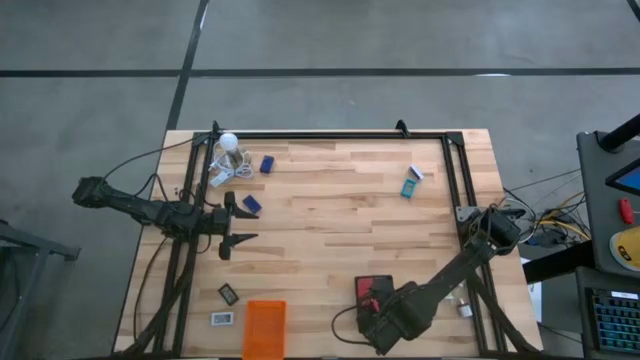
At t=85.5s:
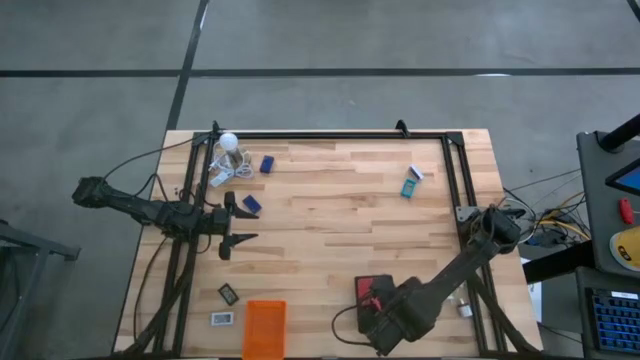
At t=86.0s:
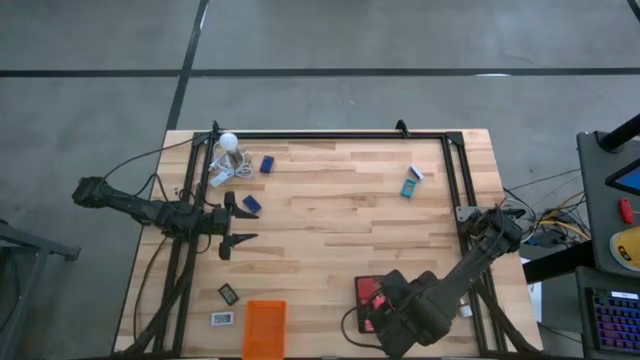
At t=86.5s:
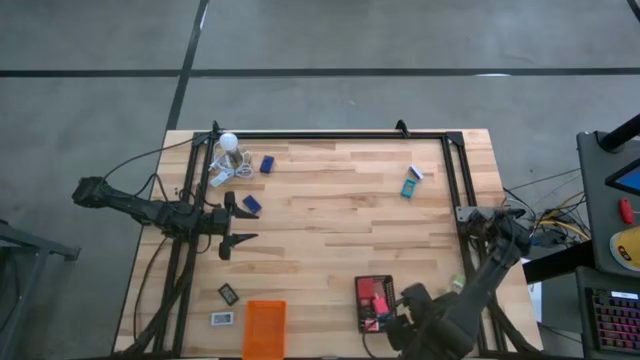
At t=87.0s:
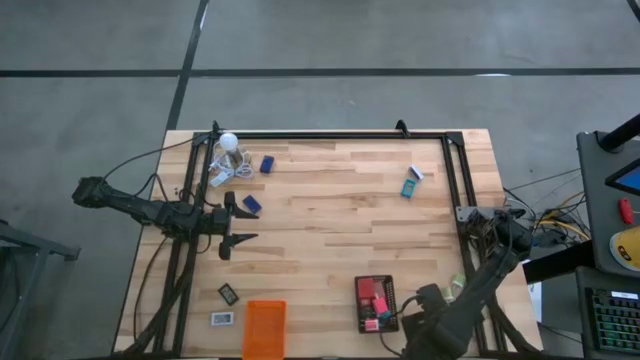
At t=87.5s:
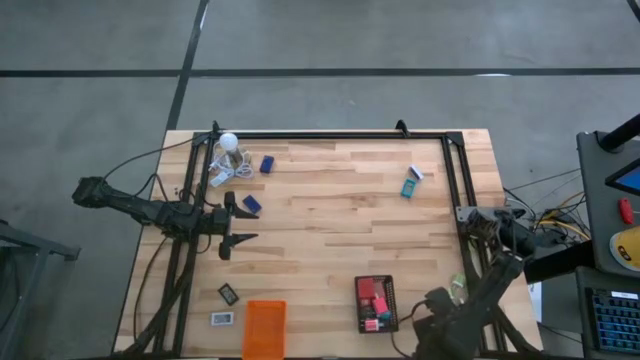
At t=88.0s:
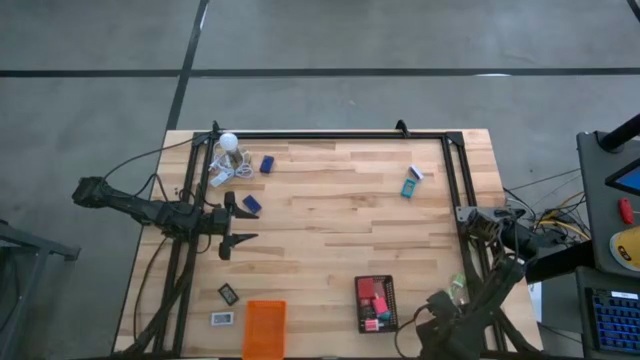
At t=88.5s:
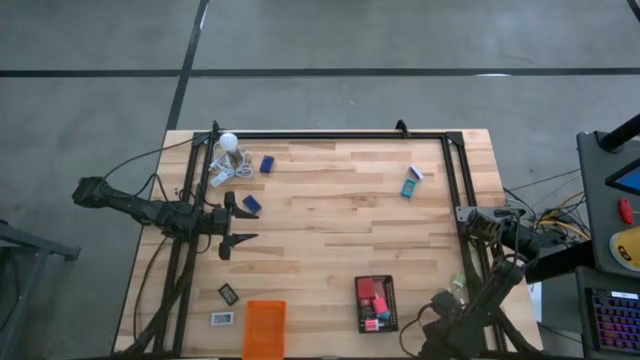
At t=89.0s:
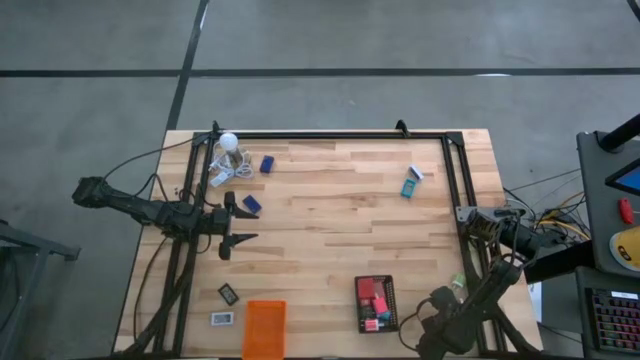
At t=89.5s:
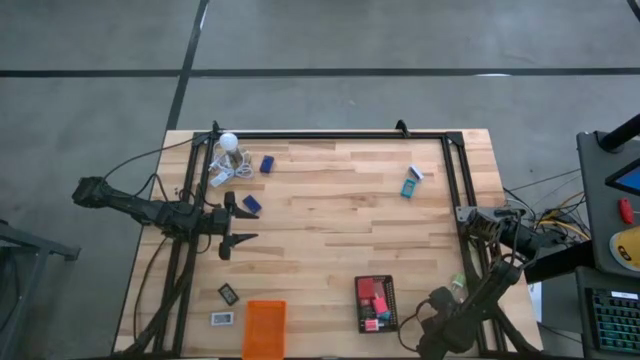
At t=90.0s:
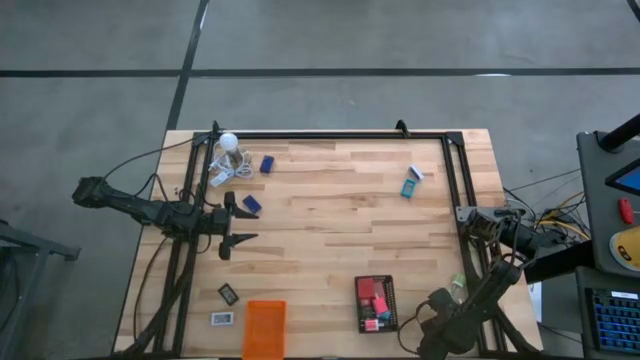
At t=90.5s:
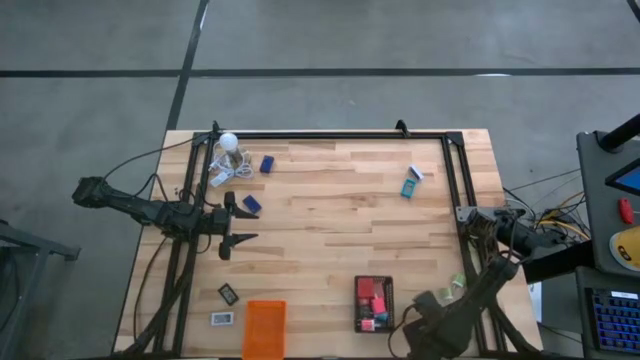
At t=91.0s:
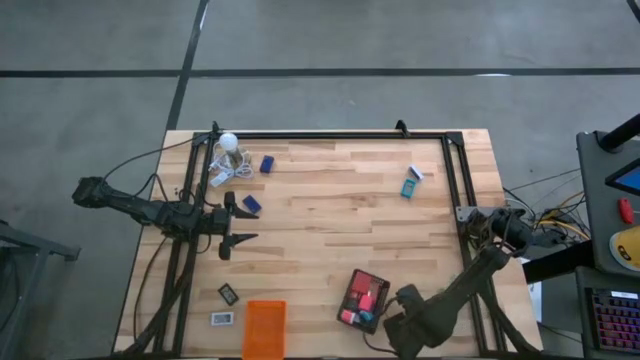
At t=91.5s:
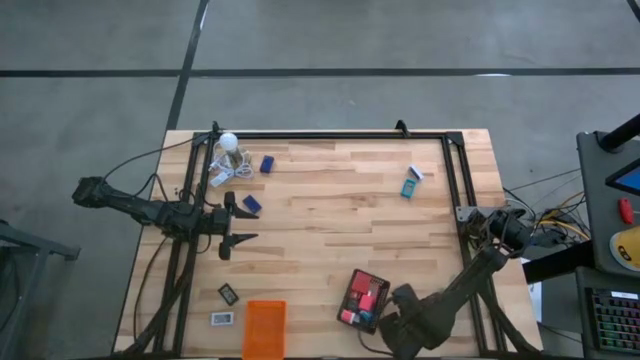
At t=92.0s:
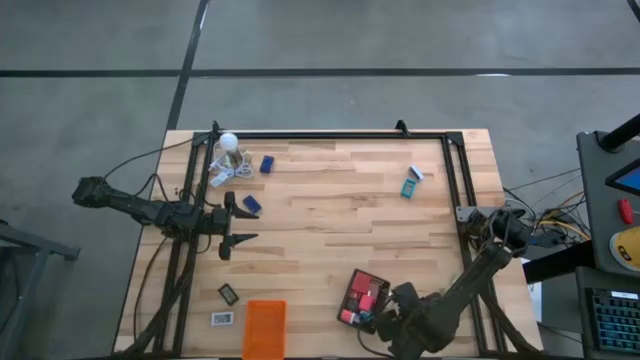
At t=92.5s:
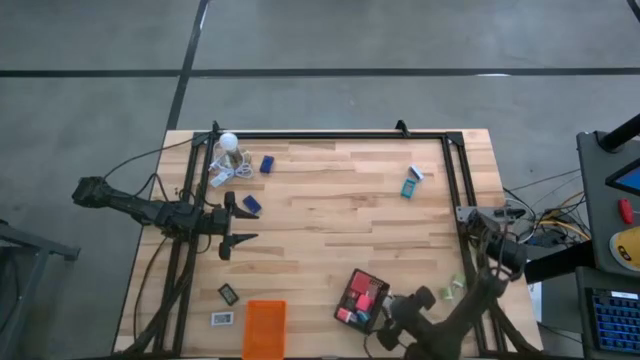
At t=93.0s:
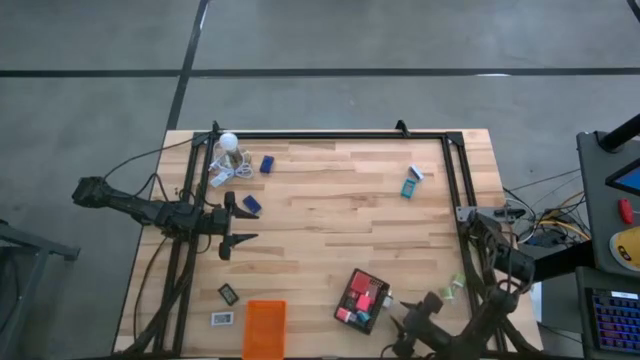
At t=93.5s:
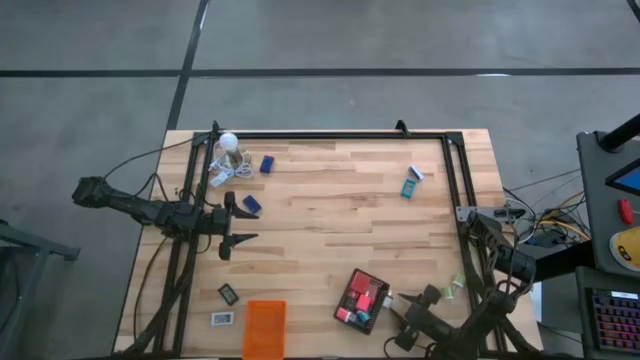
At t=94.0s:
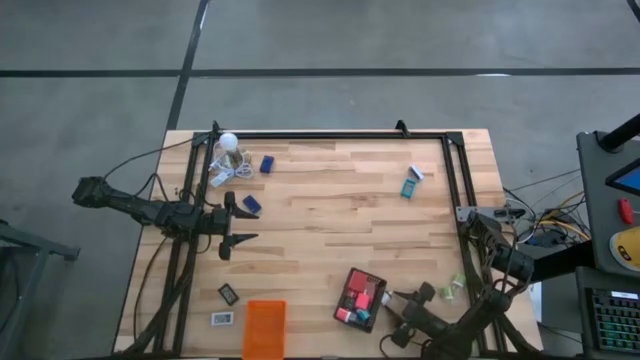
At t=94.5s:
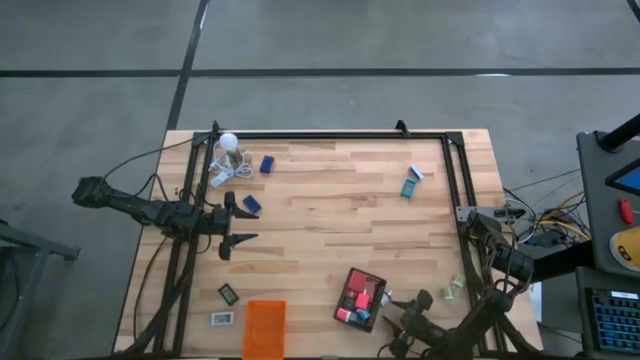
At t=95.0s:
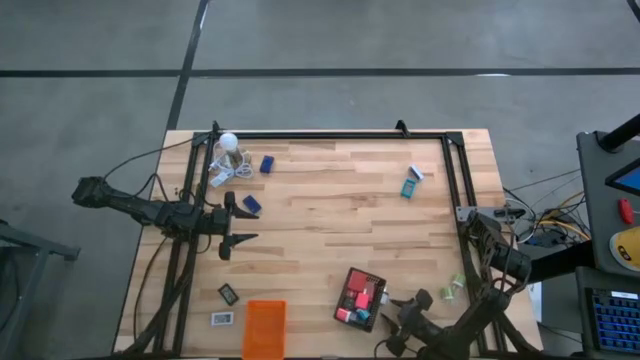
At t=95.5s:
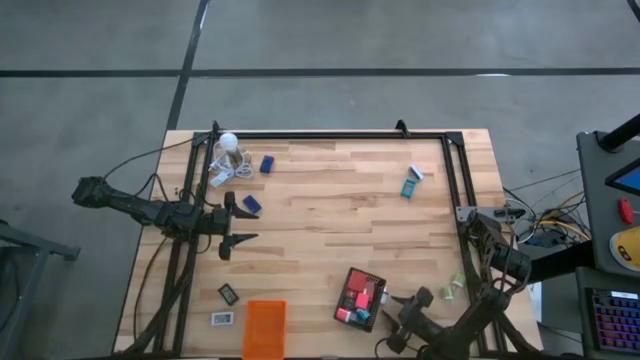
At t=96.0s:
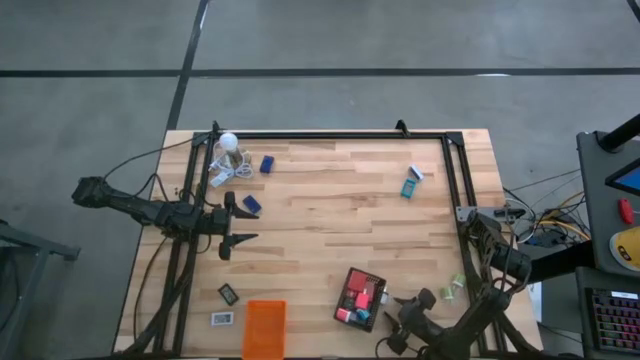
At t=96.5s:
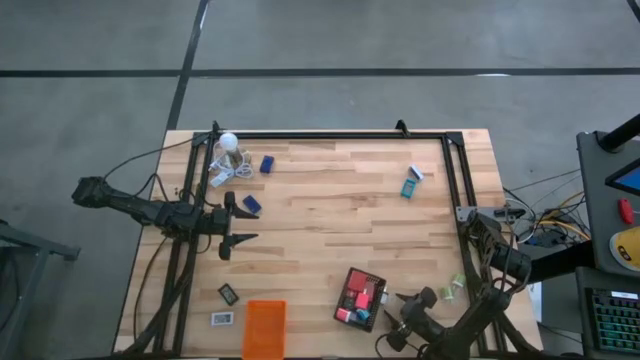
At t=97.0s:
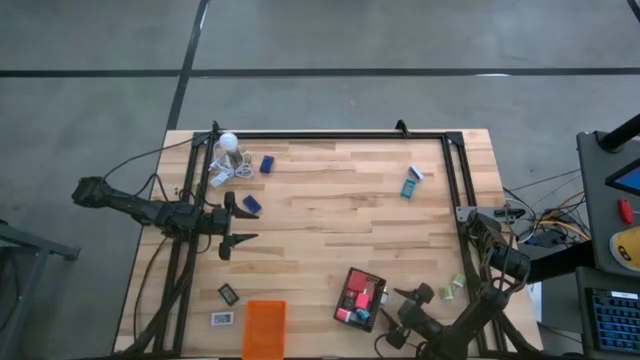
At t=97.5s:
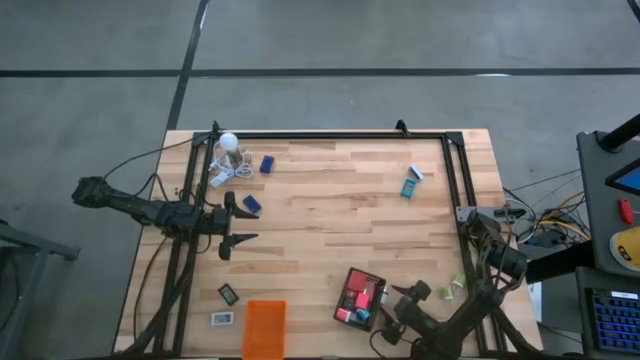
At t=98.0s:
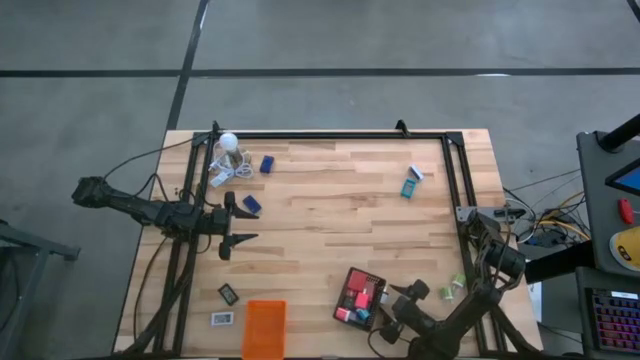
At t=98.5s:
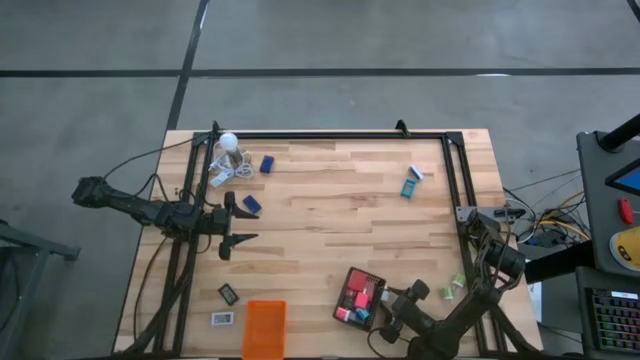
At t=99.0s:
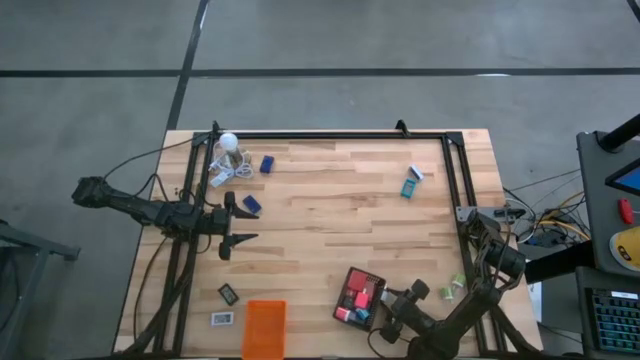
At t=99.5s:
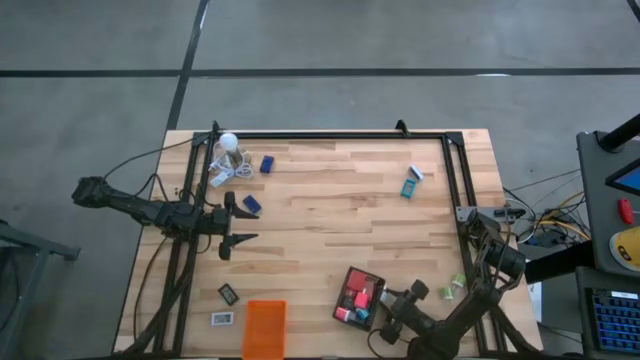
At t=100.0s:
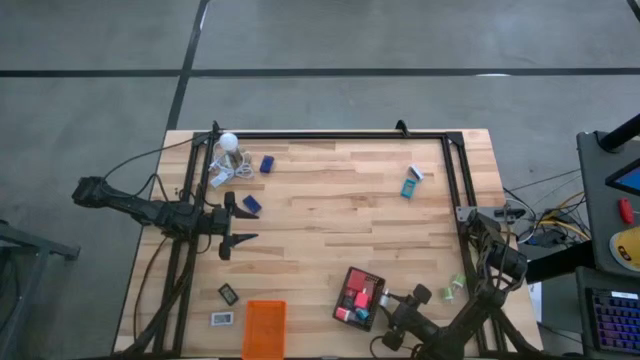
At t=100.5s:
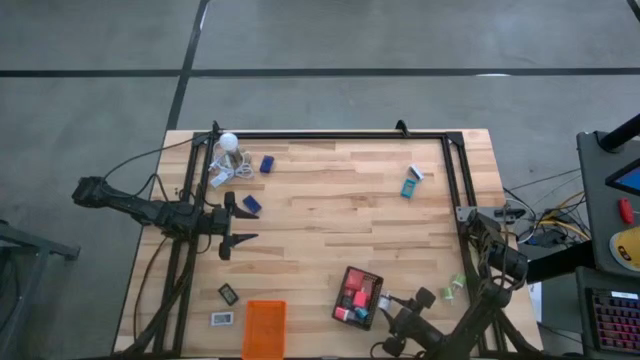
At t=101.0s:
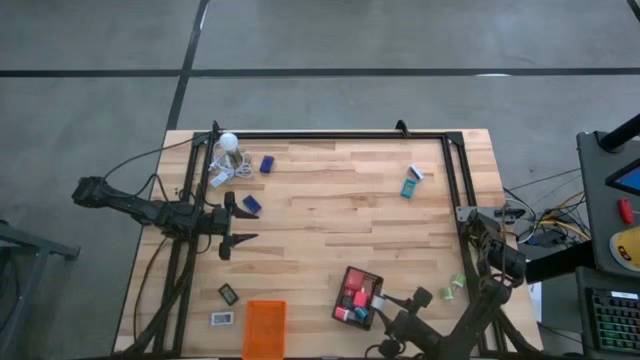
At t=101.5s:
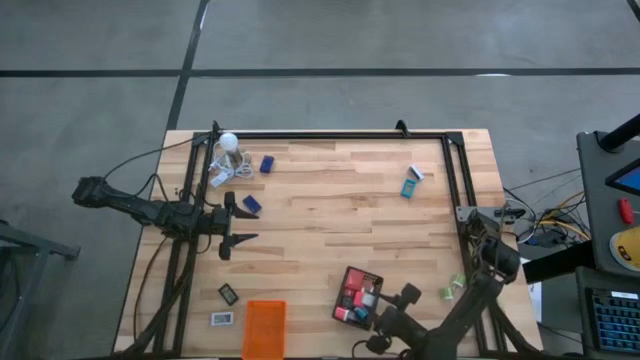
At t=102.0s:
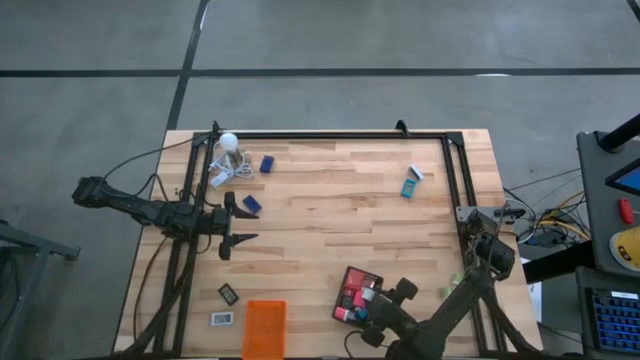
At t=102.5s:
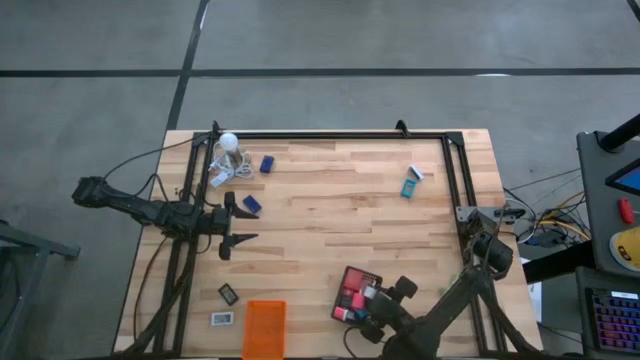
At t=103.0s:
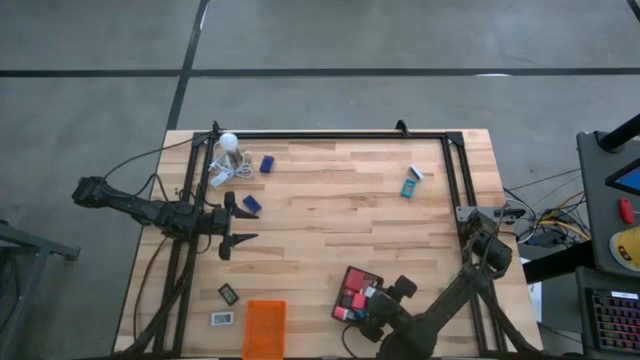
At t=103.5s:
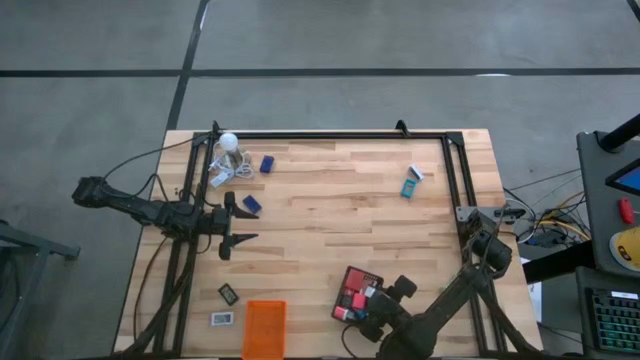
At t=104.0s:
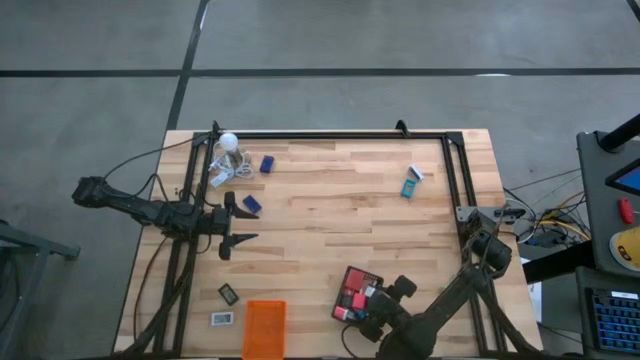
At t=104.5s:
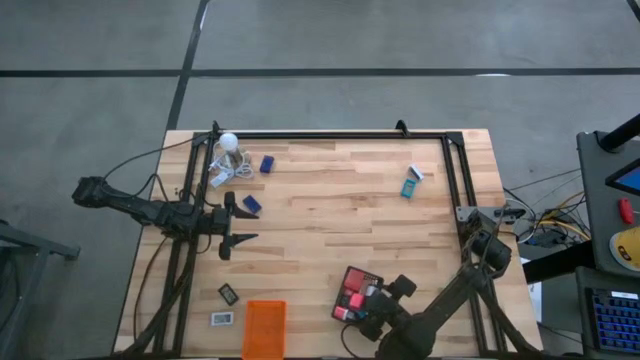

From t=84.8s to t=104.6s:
Task: Pick & Place Office items
Put the white charger adapter into the black bin
